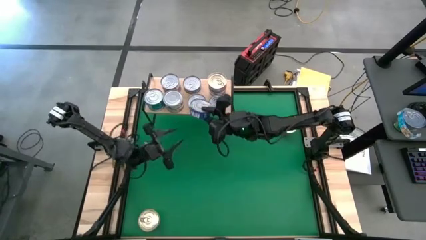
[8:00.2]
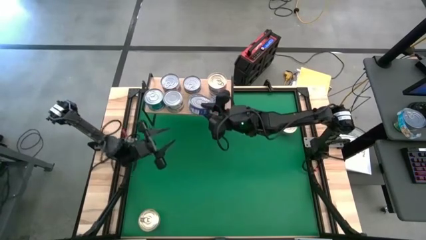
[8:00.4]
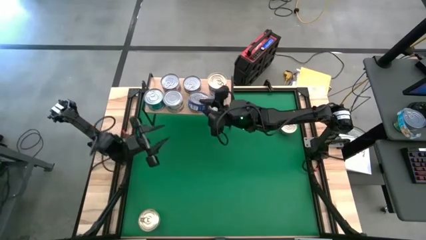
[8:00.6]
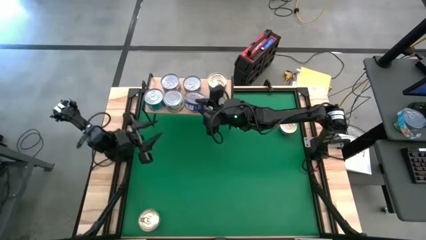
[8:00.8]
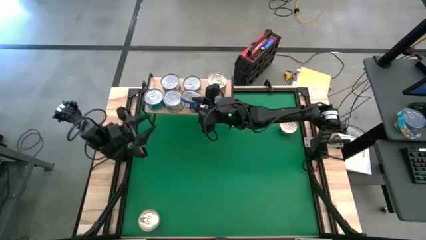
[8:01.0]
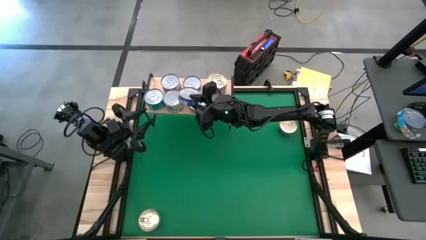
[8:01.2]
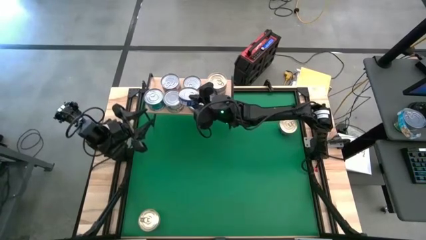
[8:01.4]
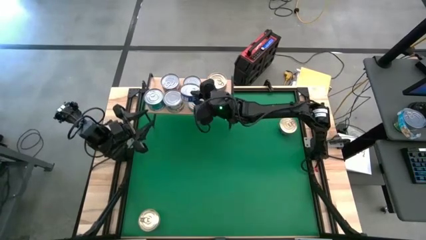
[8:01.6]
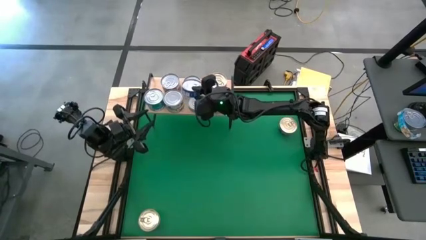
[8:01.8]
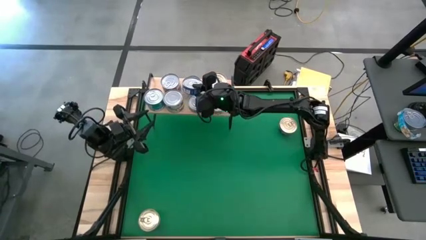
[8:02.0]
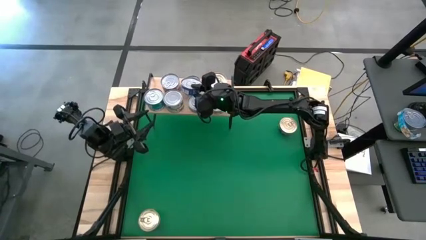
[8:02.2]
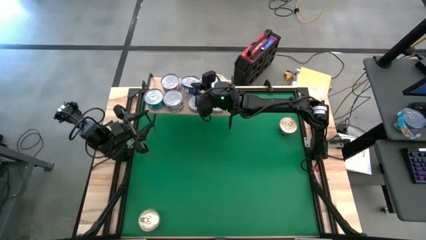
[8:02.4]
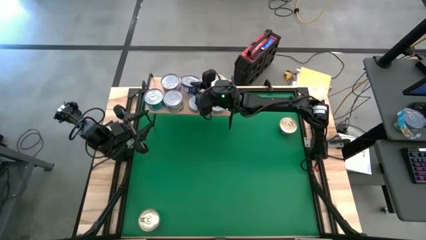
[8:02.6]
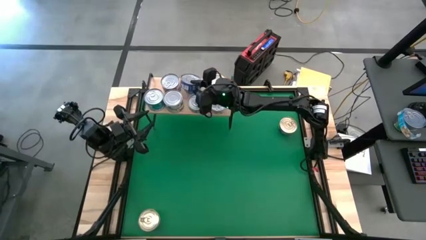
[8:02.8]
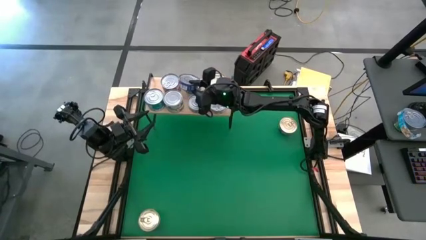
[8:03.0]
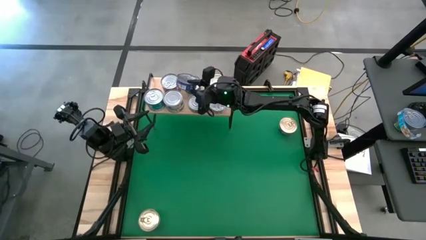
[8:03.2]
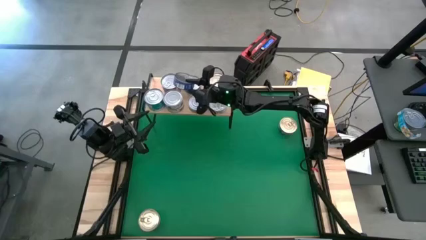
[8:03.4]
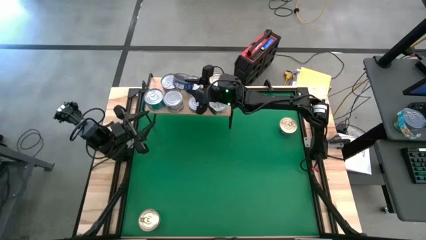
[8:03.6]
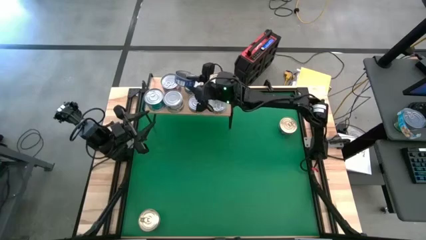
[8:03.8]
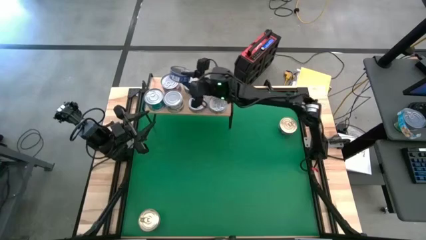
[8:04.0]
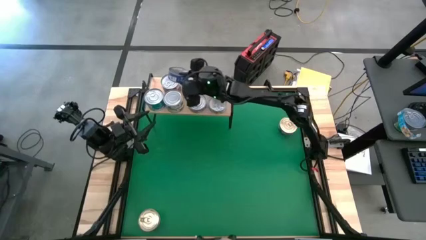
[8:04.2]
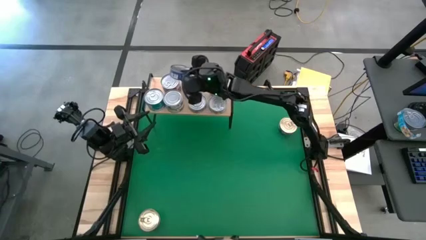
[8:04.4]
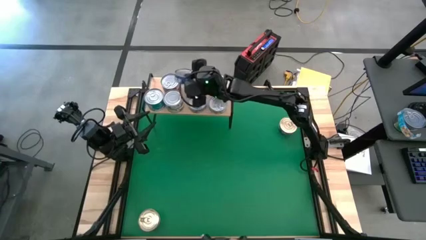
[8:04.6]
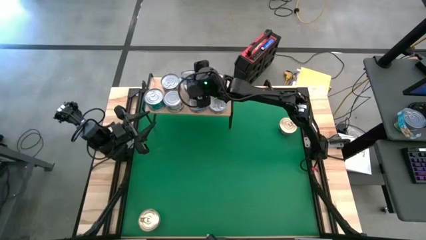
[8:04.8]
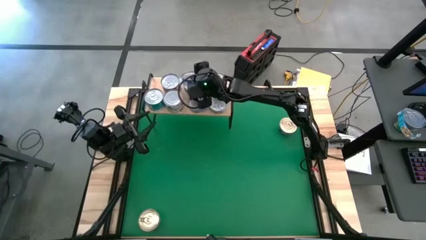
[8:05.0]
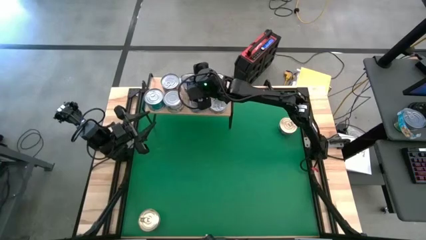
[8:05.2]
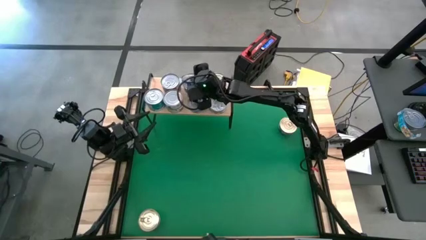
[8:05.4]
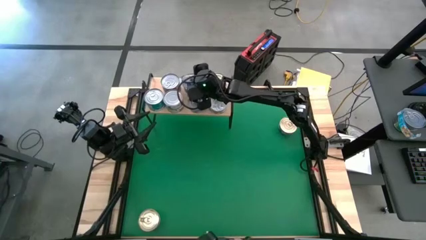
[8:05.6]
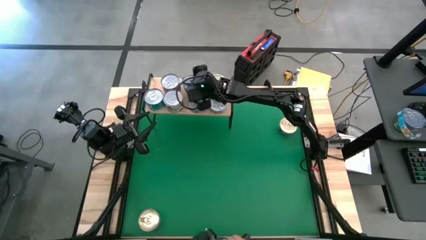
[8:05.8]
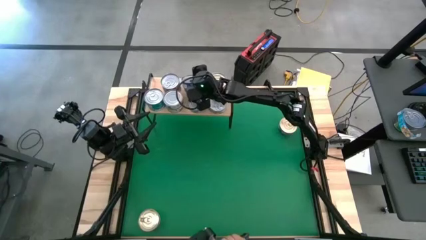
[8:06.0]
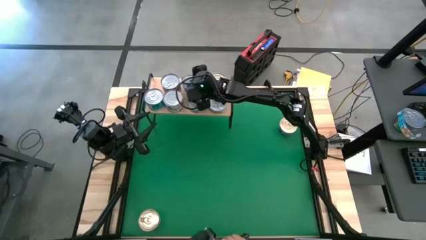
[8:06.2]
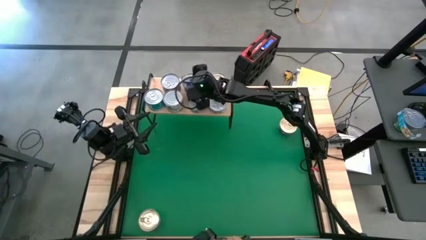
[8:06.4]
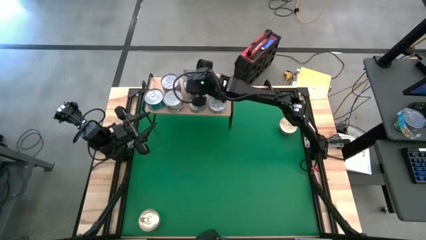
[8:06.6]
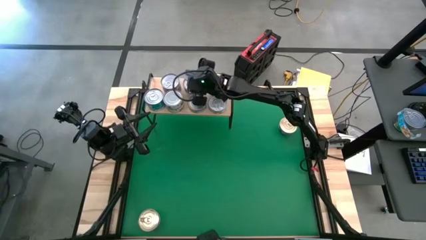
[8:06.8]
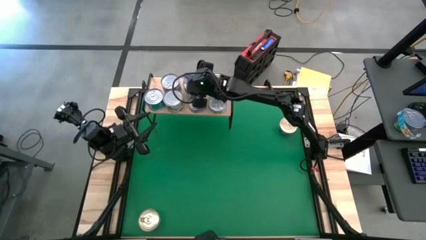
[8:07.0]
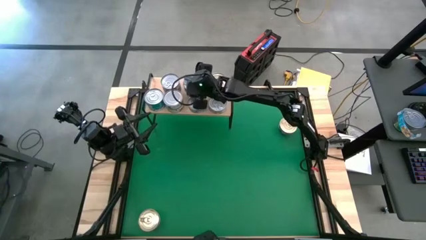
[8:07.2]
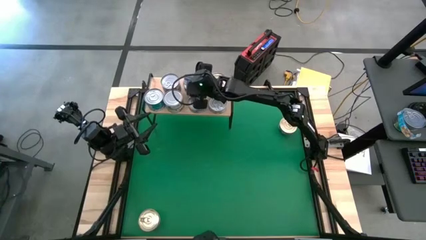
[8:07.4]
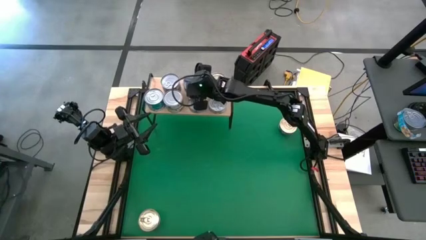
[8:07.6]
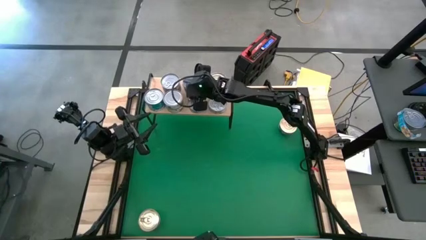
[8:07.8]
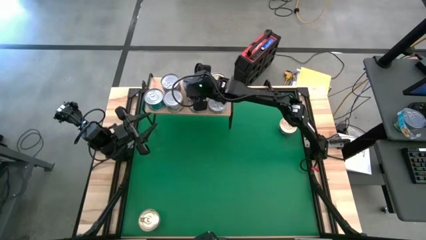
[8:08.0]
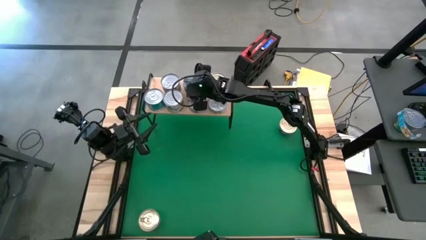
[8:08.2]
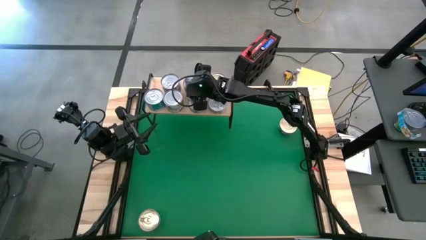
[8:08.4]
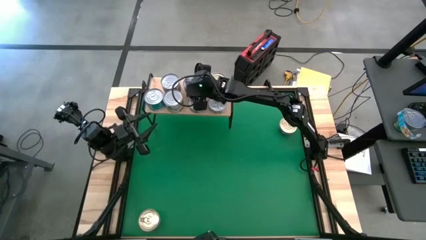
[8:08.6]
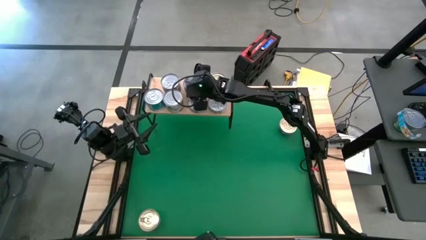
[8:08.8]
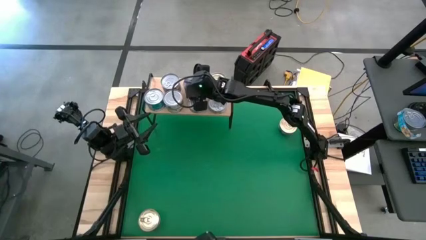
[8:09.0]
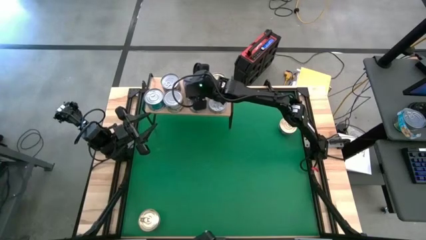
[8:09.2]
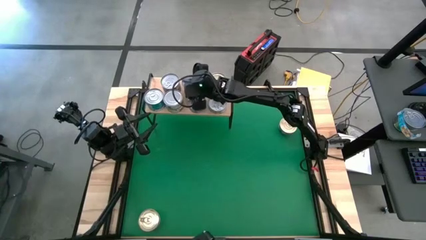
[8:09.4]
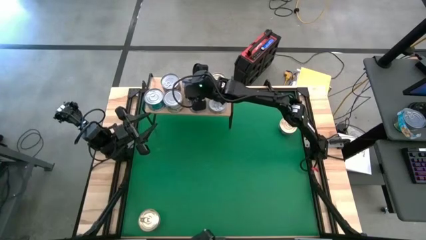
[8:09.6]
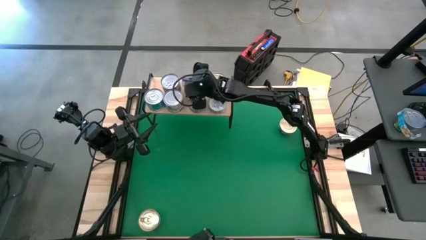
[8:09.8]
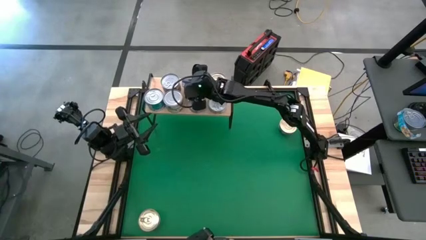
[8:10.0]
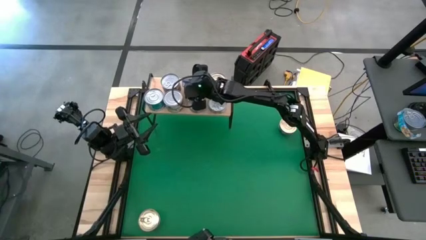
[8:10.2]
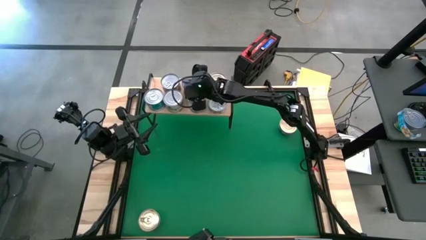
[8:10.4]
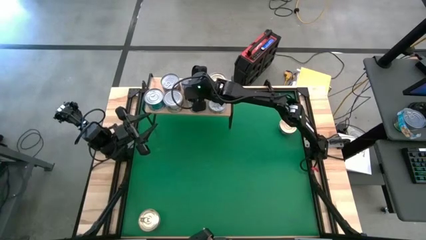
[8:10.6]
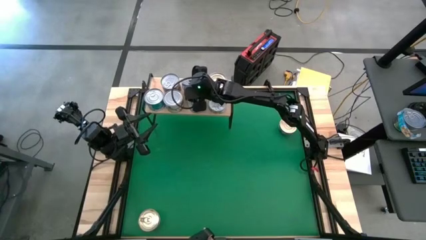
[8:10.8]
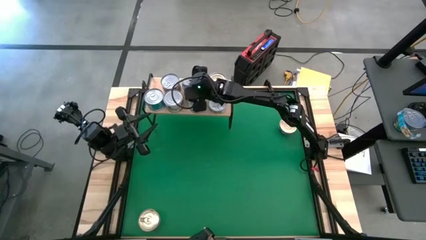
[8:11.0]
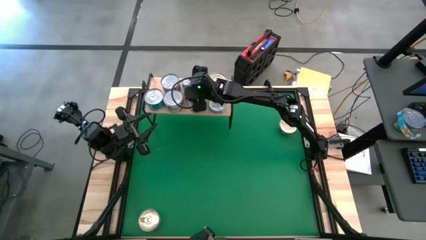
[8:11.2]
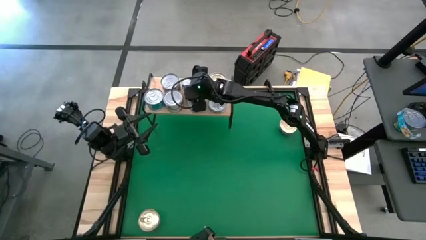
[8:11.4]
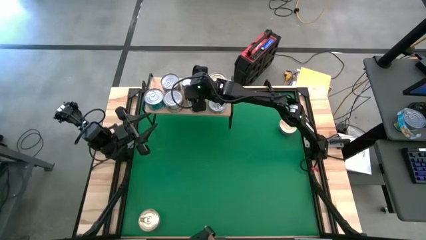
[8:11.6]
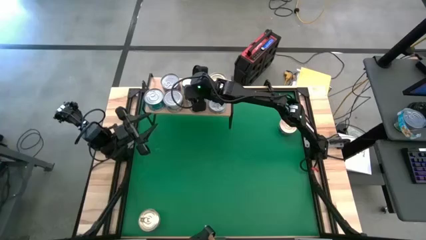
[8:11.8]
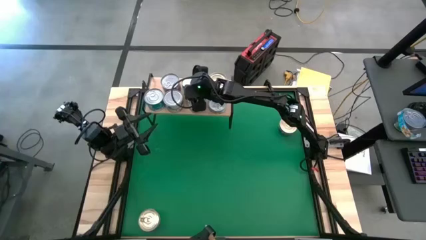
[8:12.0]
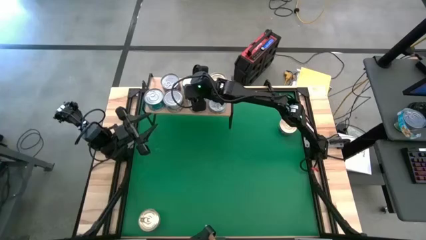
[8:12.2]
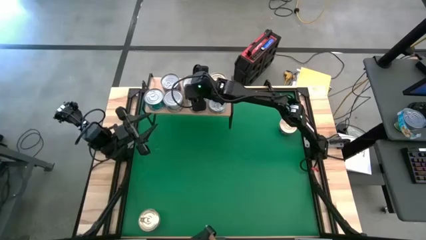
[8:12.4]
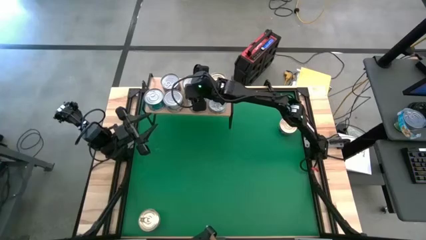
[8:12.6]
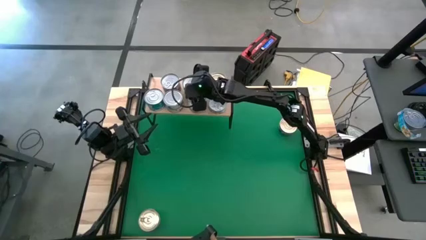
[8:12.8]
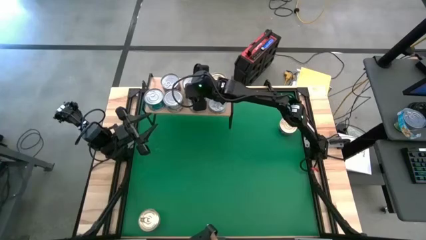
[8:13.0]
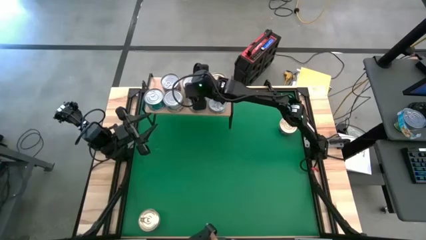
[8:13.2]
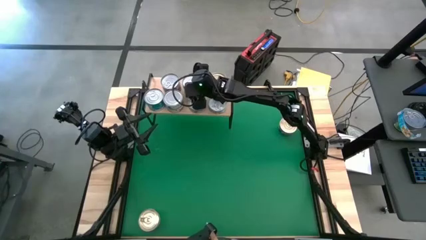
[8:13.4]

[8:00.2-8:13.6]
Task: Stack canned seafood by type on shelf
Stack the center dark blue tuna can on top of the dark blue tuna can on the shelf
